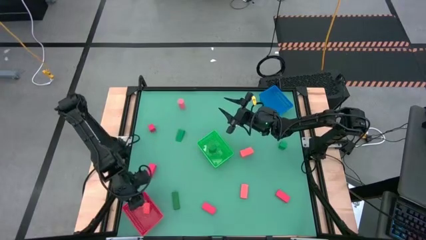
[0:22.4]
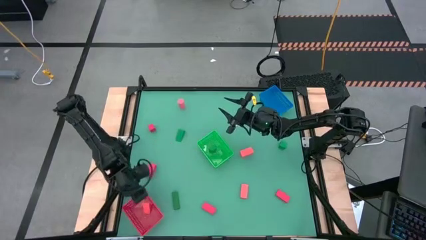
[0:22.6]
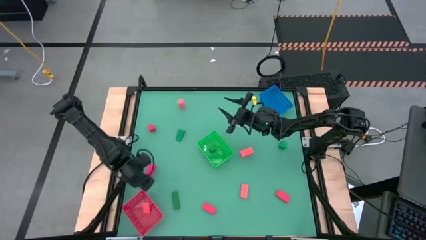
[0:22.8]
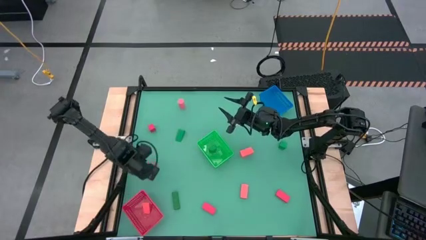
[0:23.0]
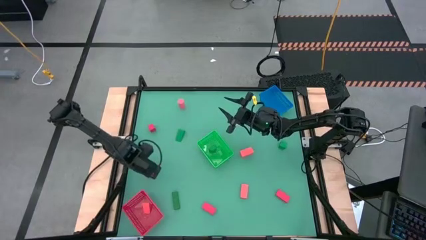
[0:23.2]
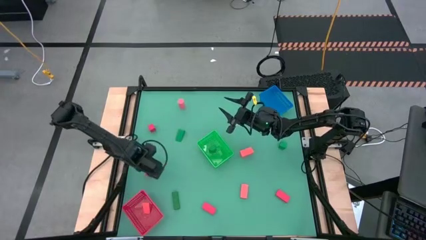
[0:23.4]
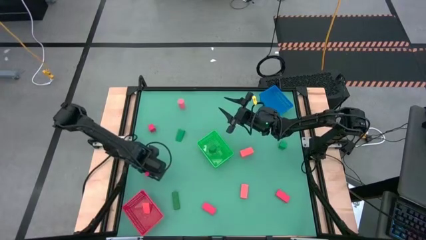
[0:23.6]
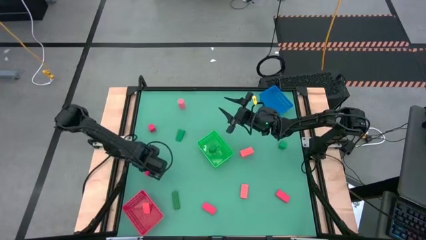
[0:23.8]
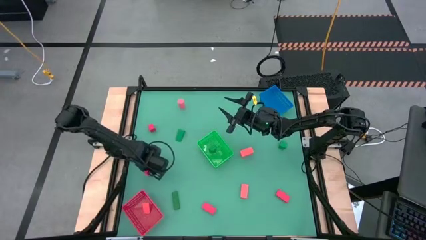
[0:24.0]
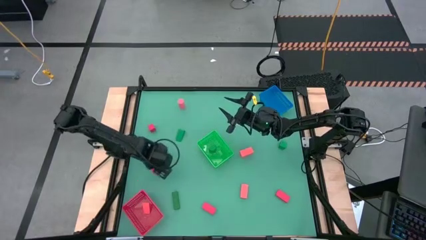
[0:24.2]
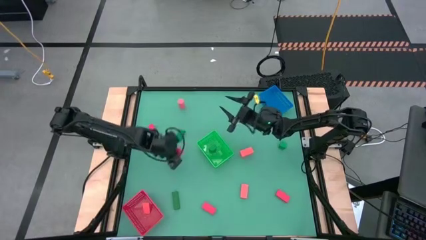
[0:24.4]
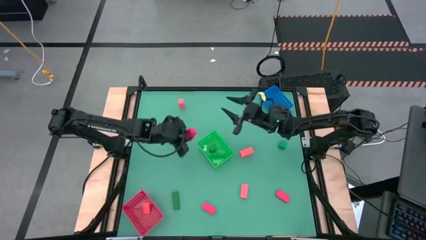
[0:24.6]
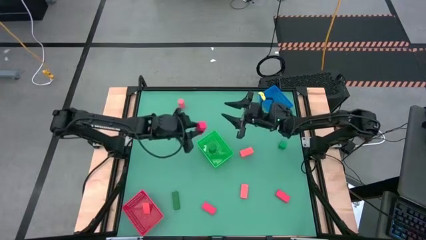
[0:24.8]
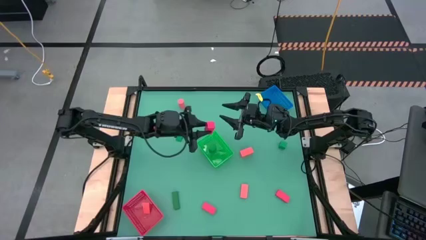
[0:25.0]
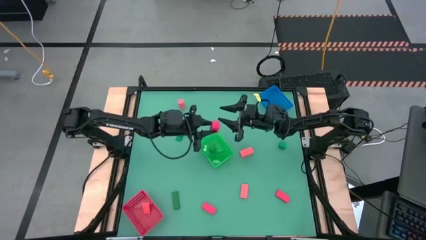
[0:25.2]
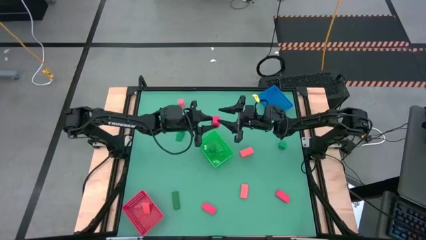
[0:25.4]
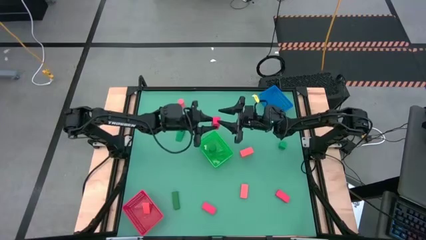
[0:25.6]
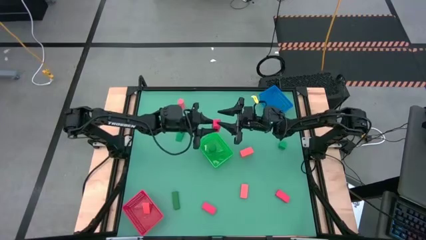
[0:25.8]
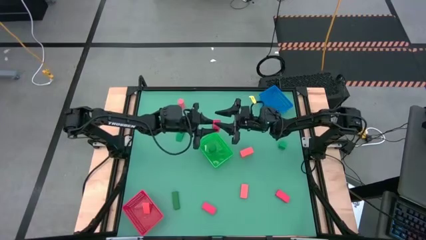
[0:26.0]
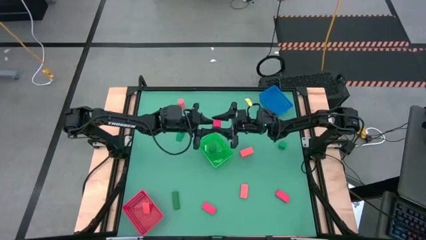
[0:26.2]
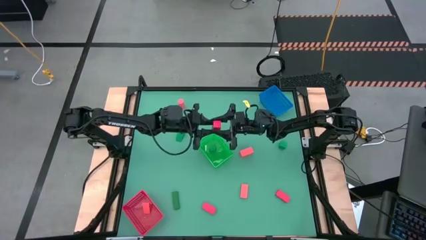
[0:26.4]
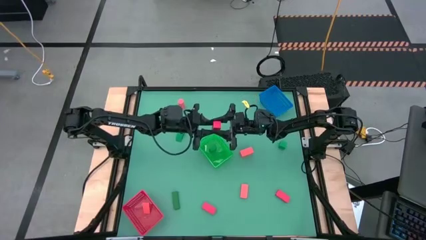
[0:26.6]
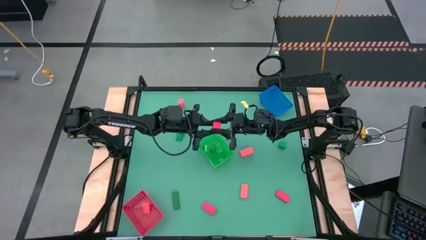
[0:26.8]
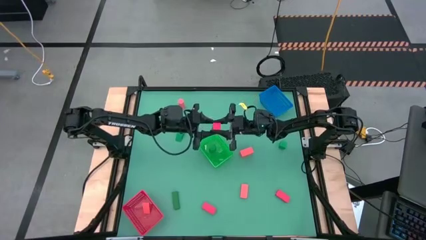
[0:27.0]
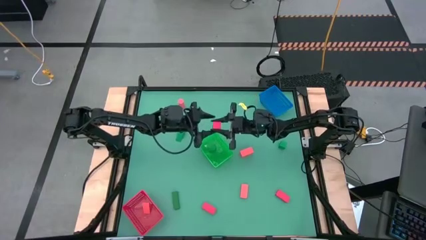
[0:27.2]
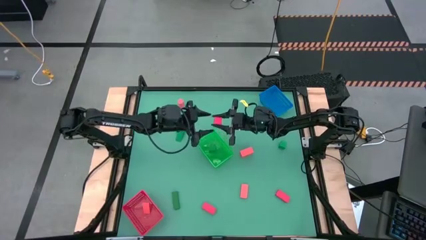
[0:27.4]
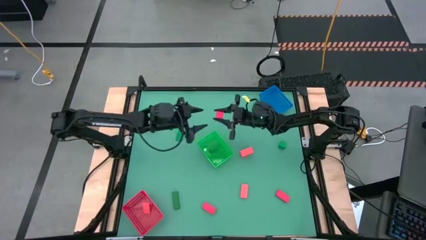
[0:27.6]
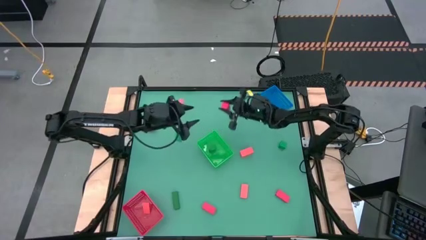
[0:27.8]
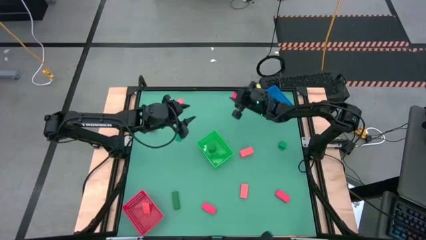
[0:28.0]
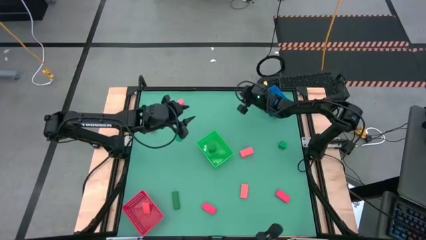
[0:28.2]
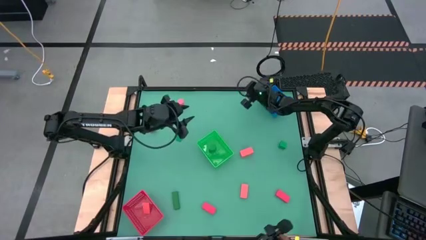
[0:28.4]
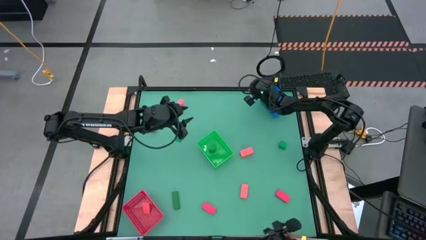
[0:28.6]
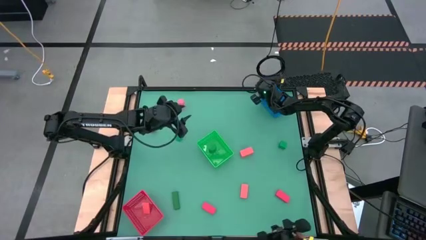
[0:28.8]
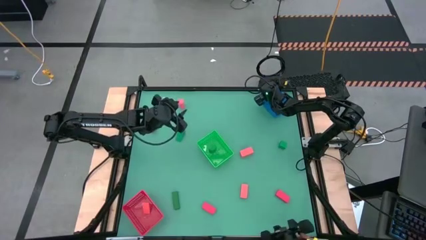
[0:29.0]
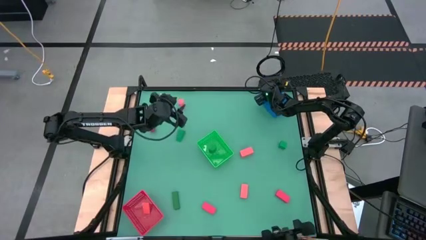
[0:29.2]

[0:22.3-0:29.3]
Task: Sort & place blocks by color
Put the light pink block into the blue bin

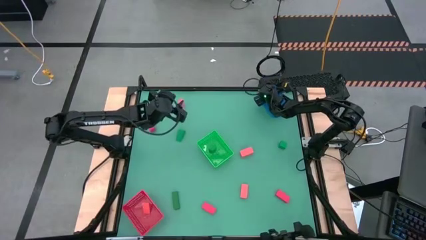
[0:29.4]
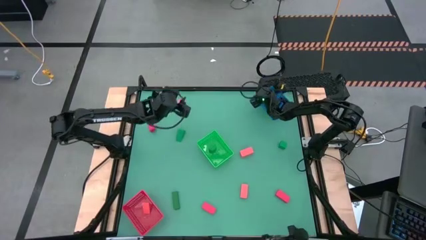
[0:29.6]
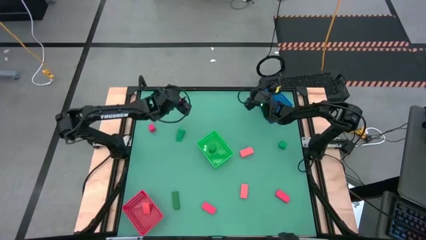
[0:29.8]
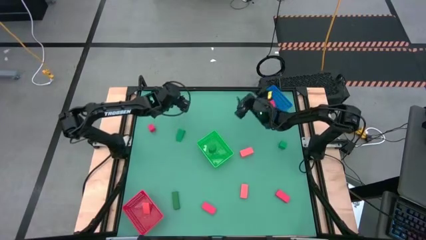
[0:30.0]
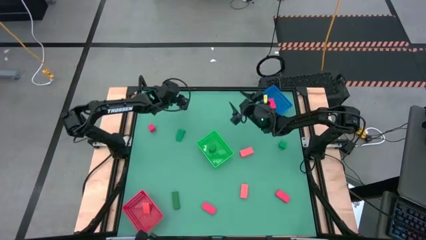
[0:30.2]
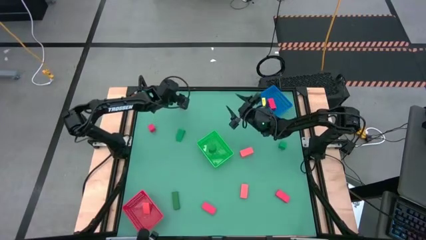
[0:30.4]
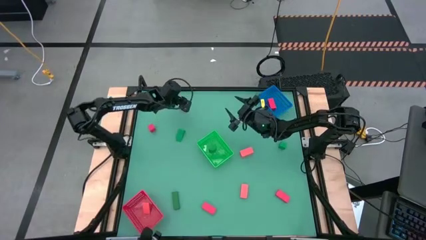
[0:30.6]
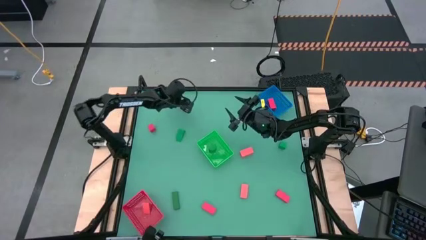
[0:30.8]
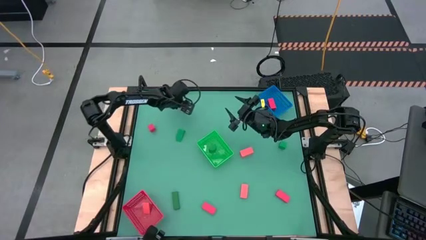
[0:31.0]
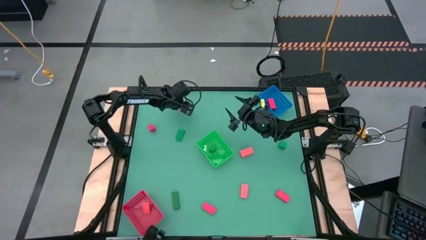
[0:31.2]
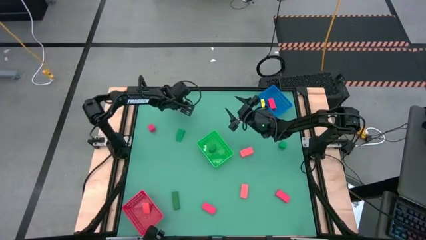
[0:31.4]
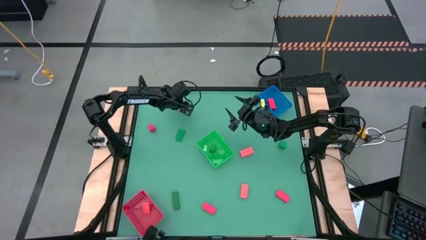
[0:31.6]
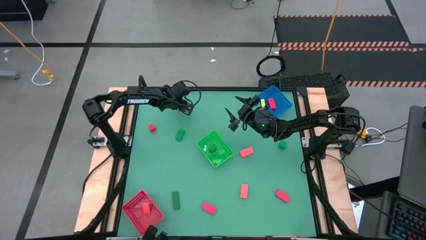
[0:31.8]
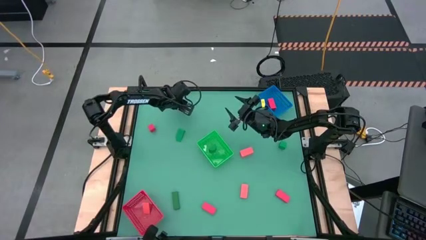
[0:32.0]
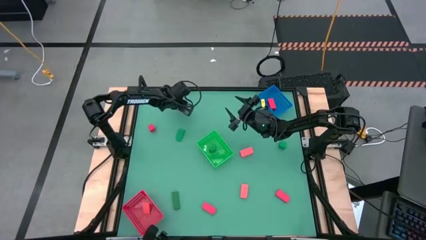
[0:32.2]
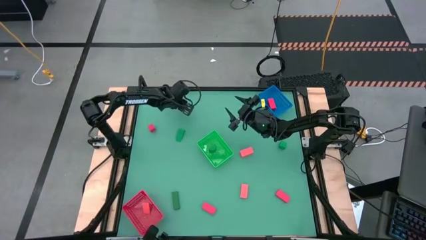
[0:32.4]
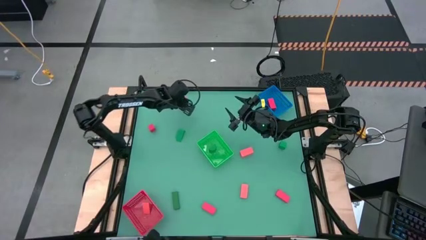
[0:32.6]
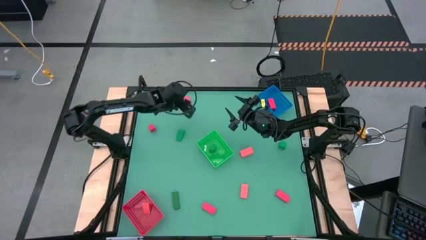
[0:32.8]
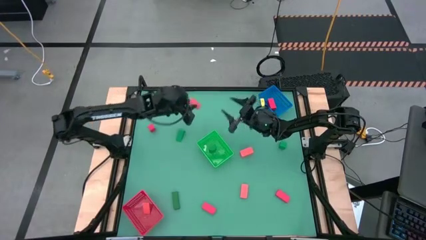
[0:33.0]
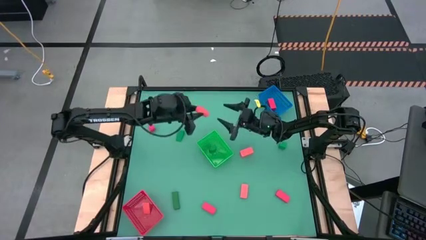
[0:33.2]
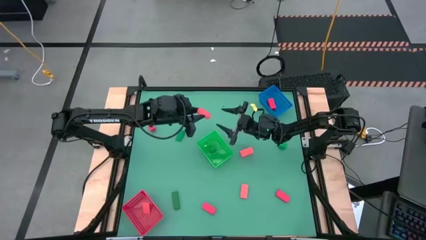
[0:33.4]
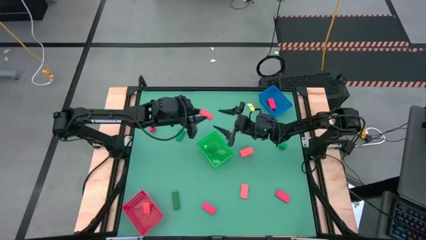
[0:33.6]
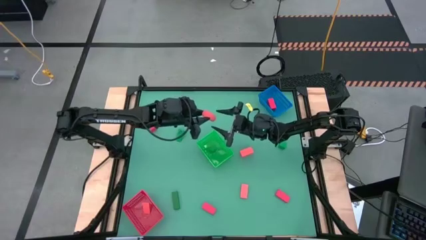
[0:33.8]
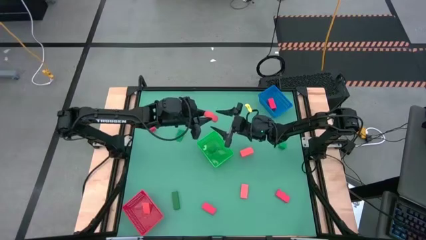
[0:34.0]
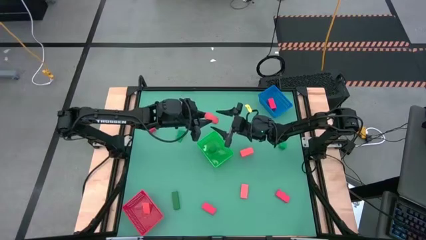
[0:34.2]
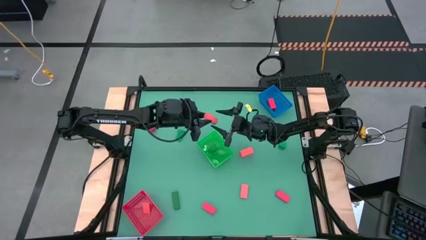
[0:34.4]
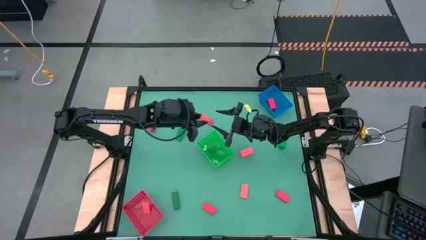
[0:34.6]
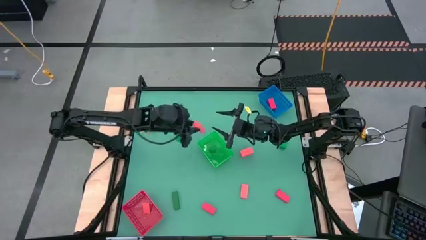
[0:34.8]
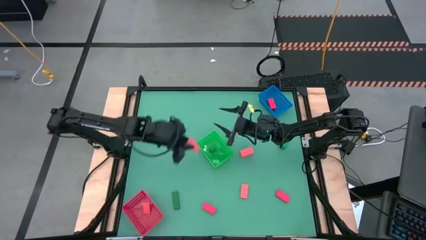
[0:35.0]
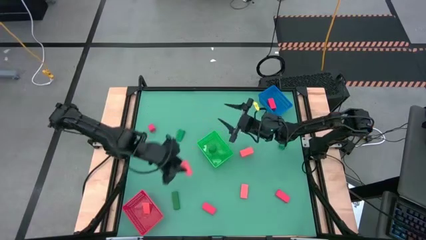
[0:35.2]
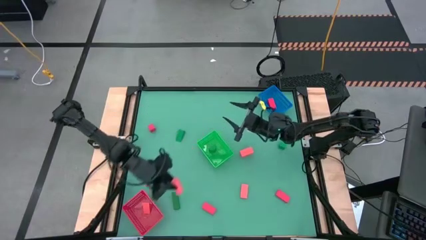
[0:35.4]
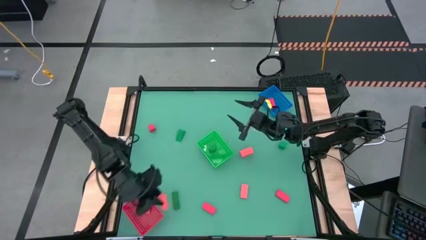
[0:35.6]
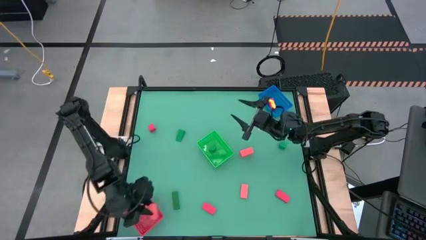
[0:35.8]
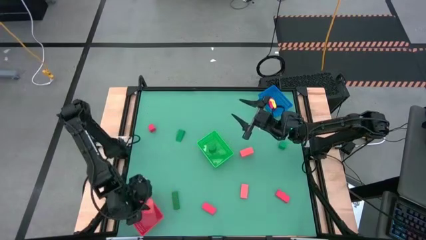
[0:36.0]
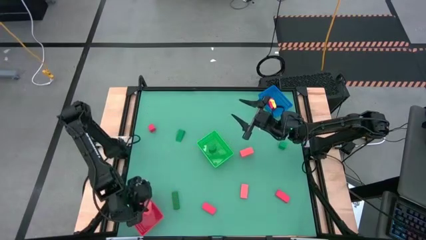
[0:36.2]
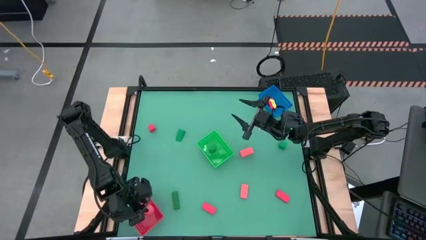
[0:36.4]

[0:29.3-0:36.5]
Put the pink block into the red bin
